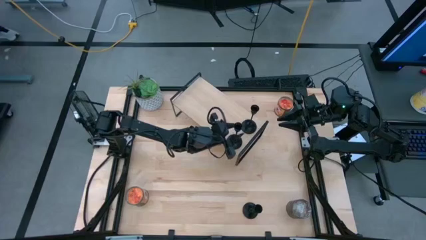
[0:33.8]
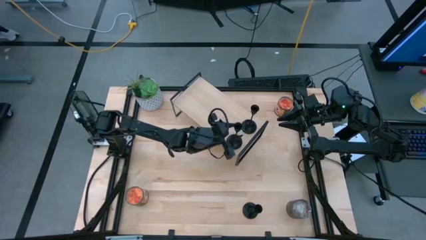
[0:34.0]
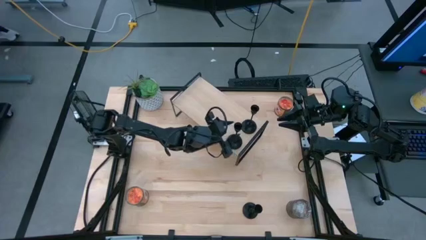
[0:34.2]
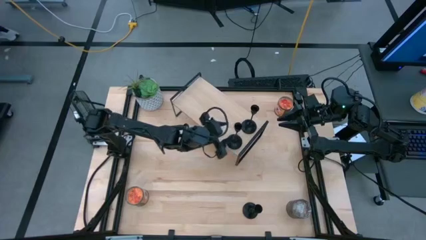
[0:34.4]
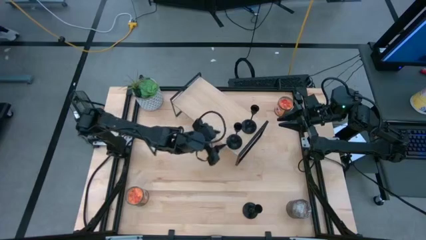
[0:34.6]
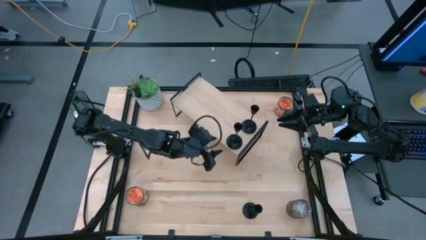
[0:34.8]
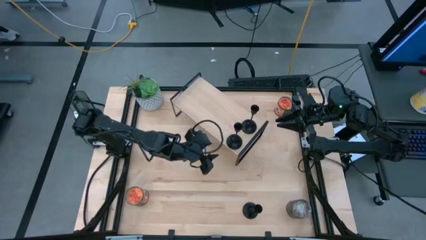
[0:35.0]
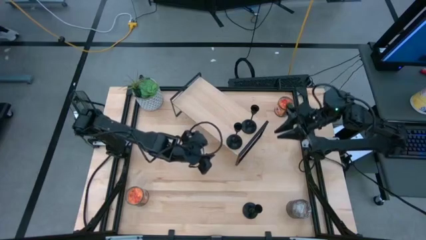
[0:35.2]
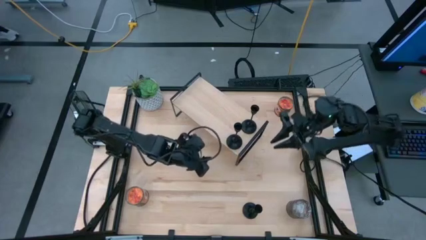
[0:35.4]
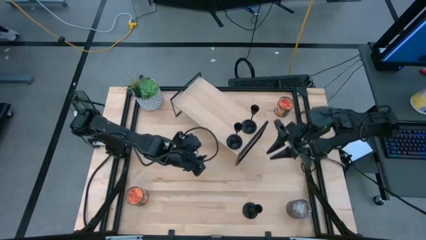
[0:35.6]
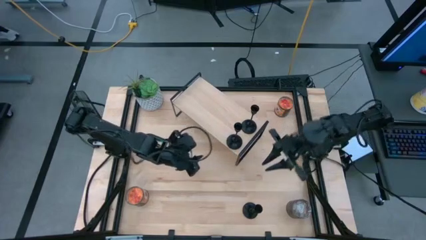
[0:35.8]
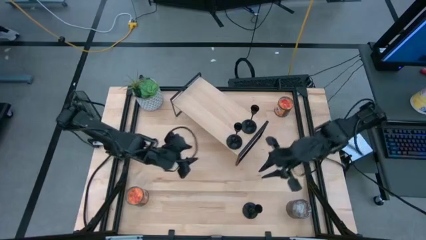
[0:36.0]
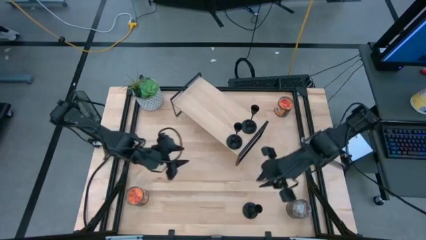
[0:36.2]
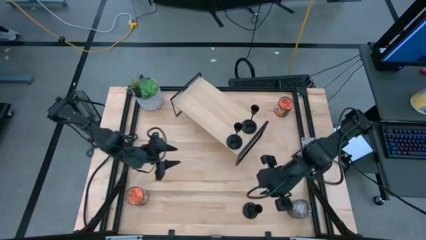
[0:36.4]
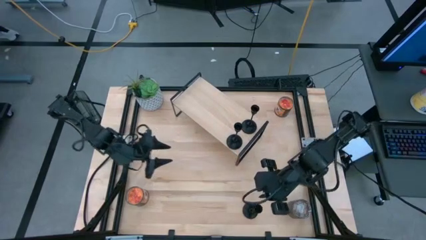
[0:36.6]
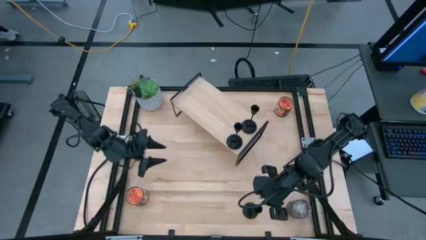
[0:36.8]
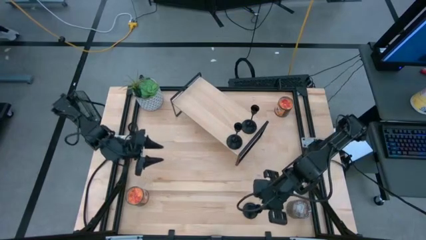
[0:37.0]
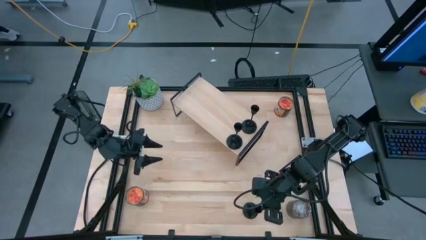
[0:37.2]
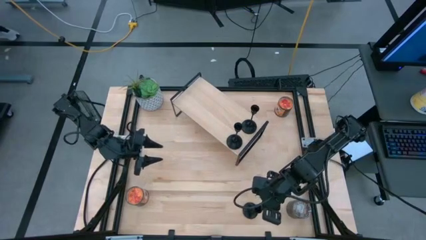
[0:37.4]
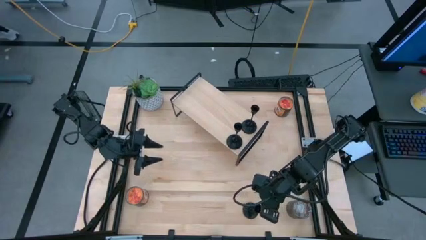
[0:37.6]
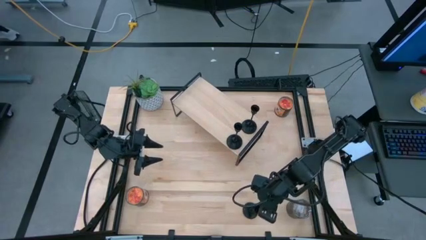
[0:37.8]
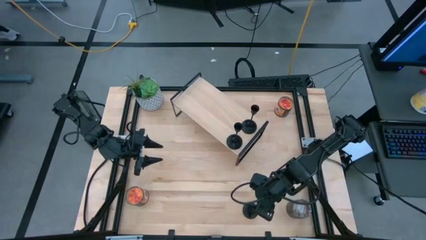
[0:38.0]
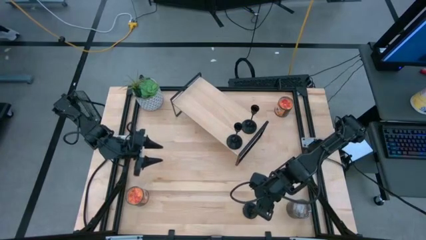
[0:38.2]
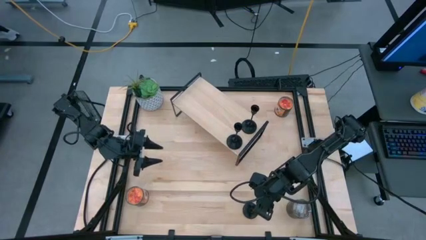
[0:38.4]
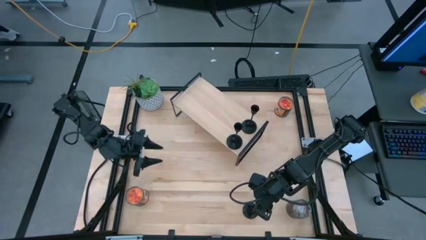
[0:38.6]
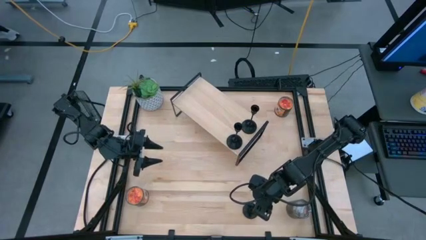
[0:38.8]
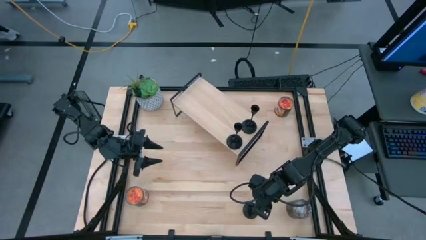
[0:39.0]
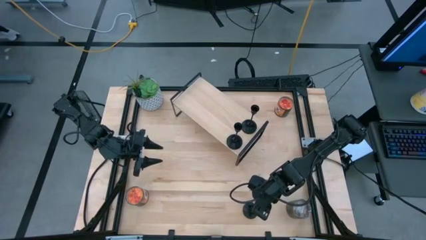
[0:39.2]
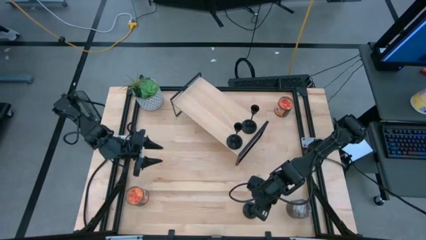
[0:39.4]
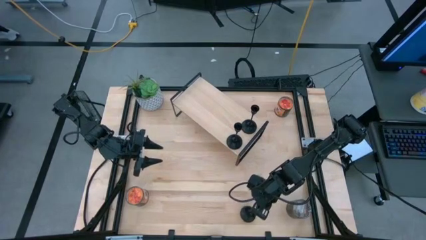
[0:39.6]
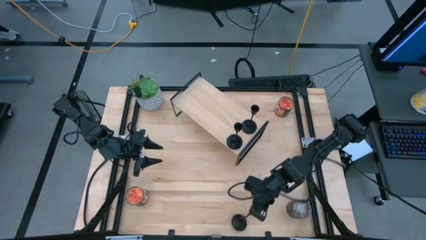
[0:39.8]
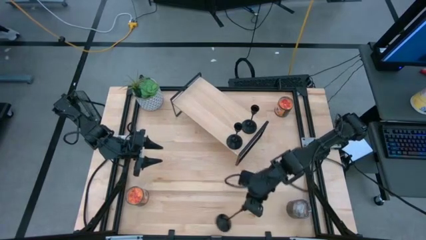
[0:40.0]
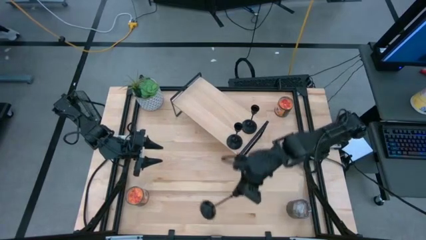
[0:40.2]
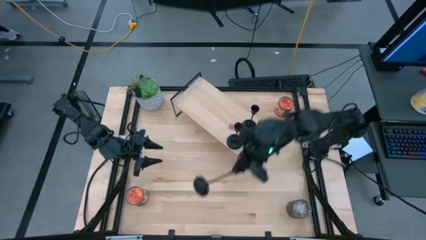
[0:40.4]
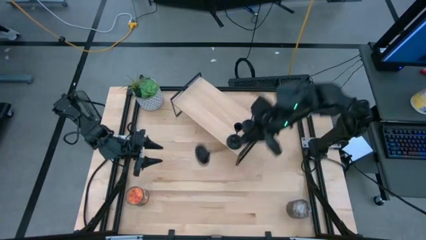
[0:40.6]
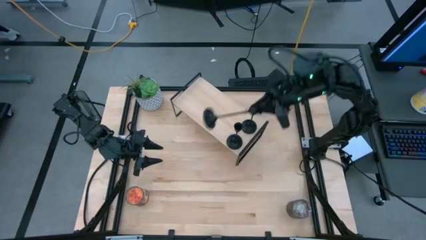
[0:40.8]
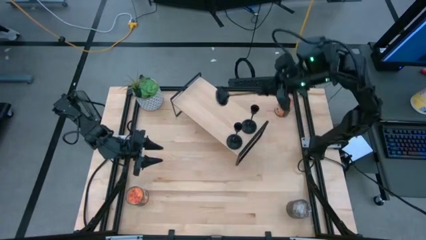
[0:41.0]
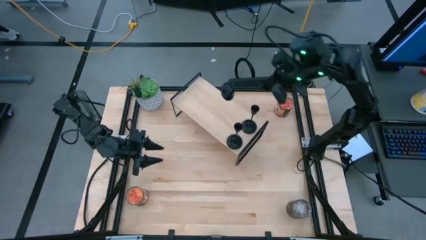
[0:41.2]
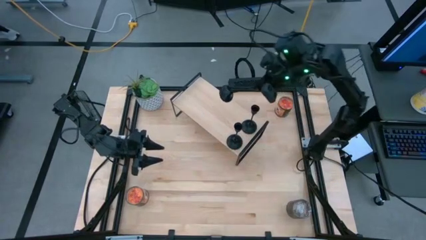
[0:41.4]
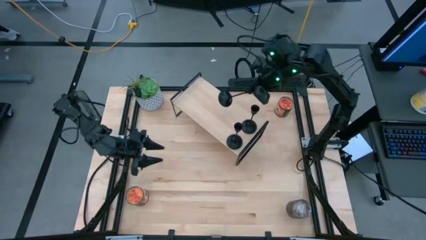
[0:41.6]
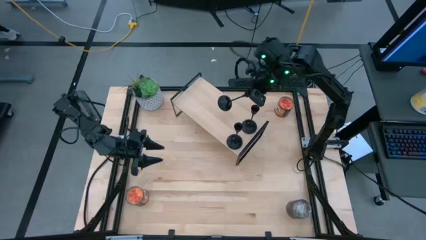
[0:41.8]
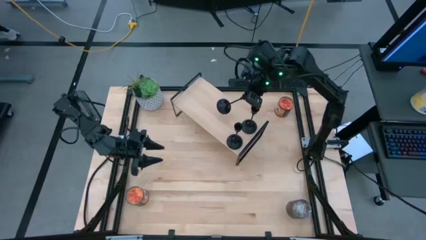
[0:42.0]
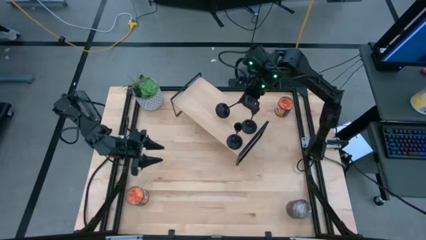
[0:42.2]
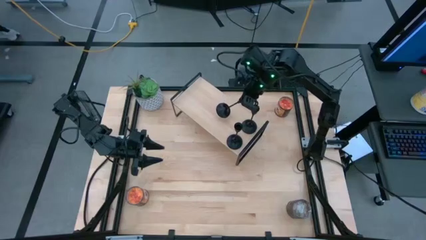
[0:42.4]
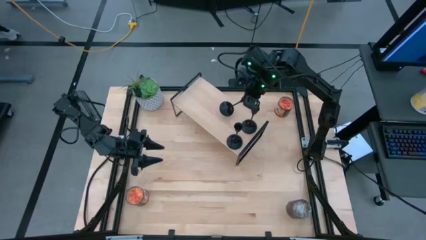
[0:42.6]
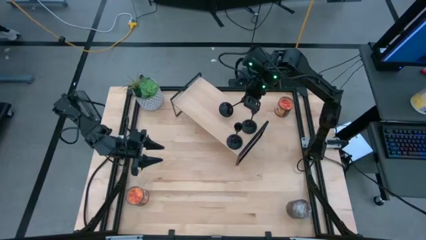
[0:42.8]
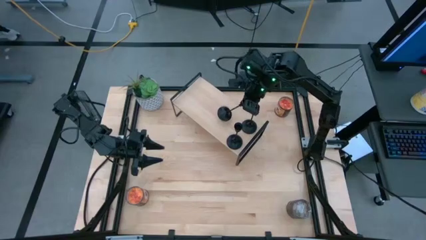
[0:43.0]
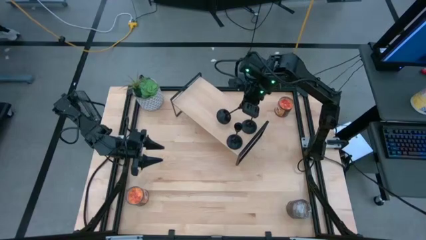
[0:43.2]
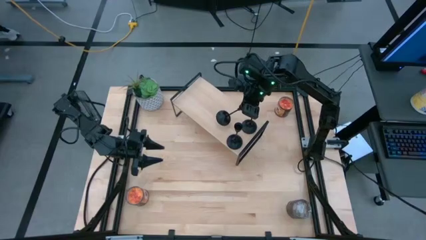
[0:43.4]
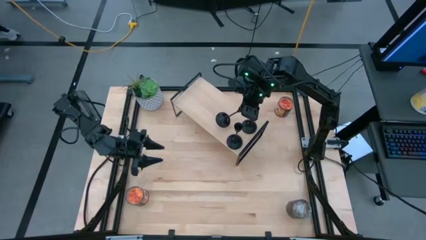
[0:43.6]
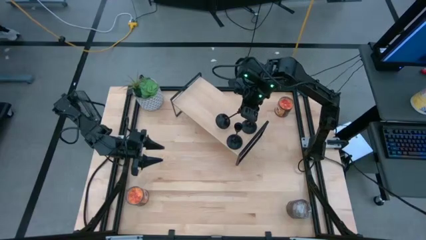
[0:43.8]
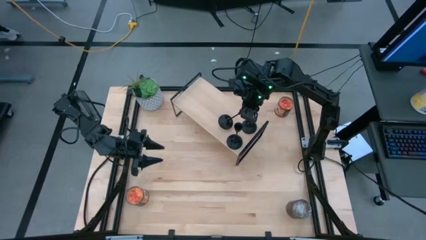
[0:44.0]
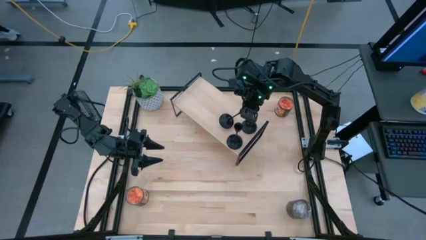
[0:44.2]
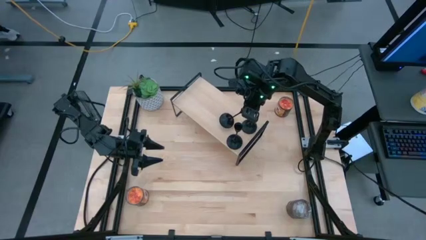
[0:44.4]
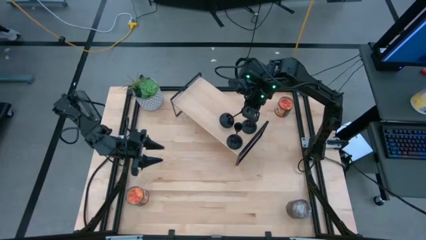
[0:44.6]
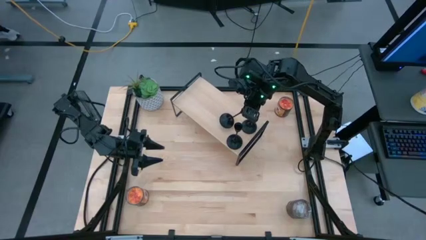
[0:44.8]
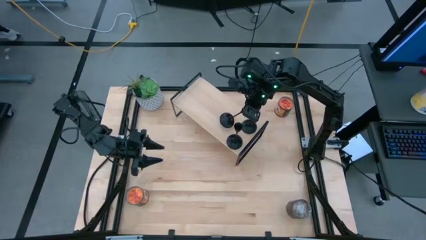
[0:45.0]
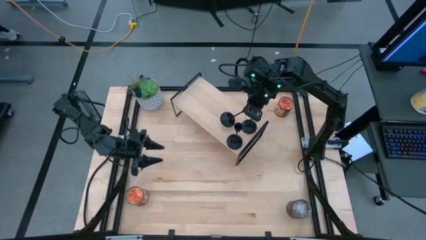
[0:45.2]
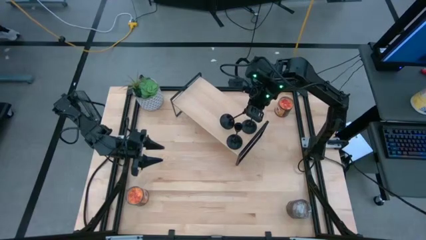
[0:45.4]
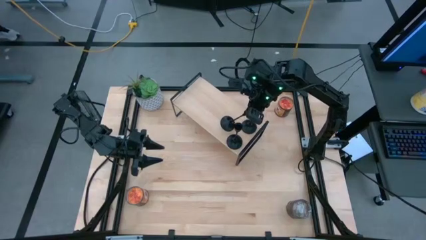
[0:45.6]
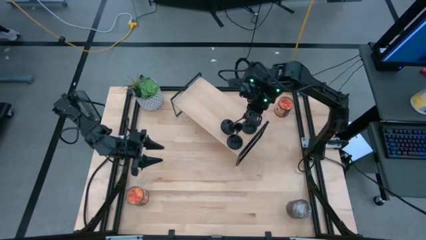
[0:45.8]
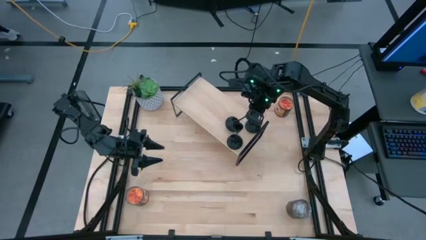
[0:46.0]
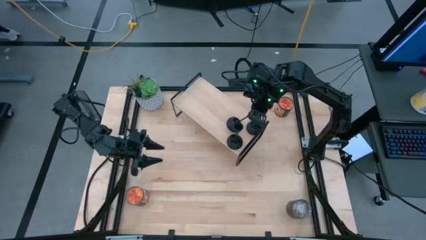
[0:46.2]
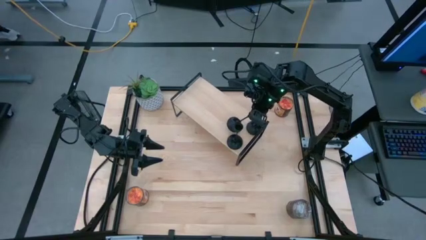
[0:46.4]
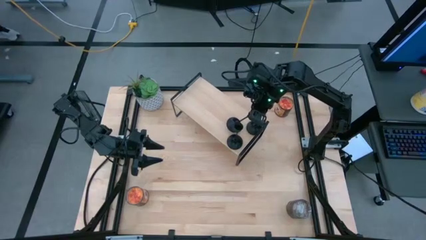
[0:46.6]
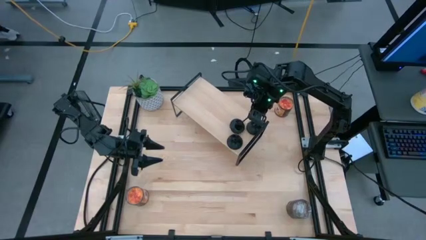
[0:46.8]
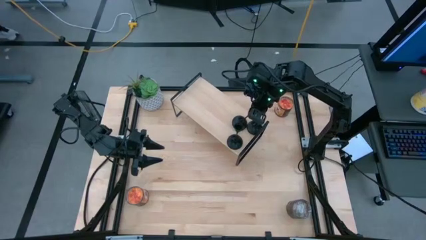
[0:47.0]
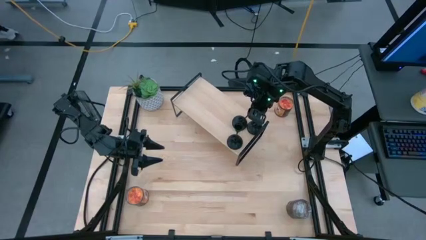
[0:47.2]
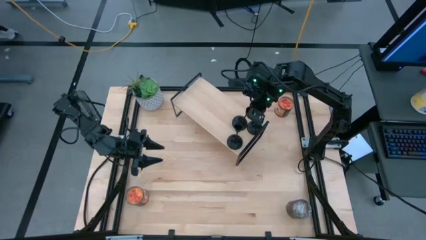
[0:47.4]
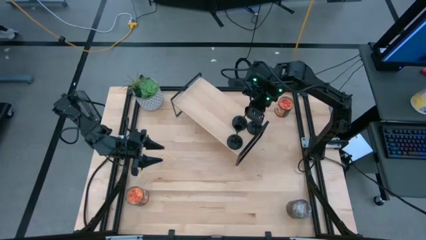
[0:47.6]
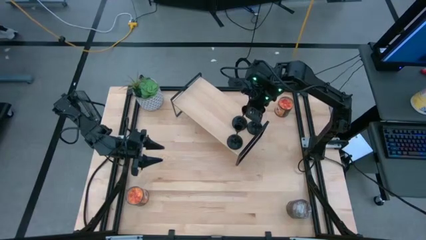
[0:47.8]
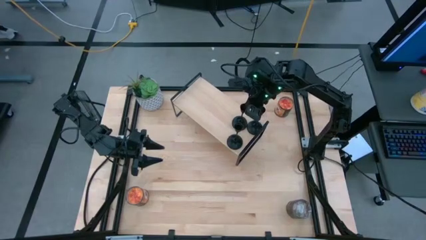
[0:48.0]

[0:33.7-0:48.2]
Task: Pick & Place candle stick holders
Put the black candlestick on the shelf
